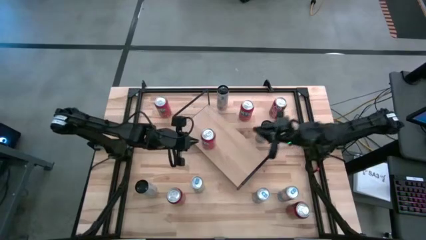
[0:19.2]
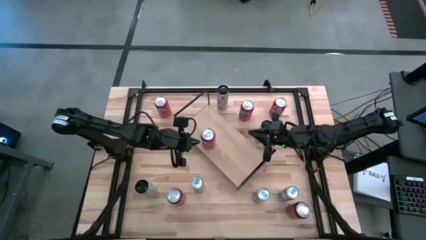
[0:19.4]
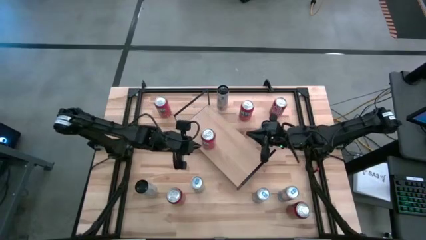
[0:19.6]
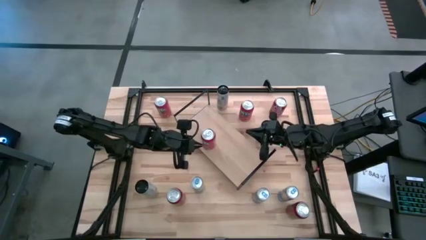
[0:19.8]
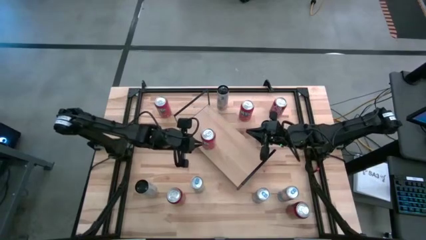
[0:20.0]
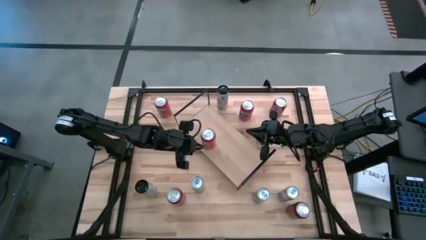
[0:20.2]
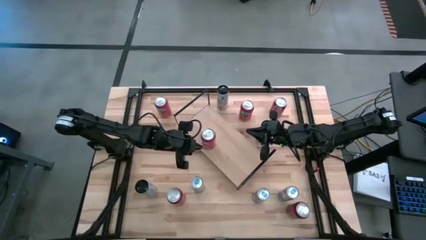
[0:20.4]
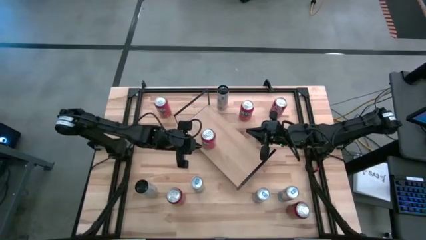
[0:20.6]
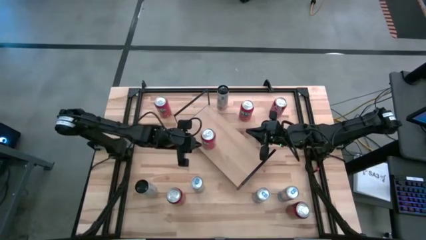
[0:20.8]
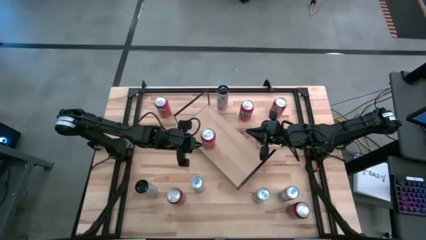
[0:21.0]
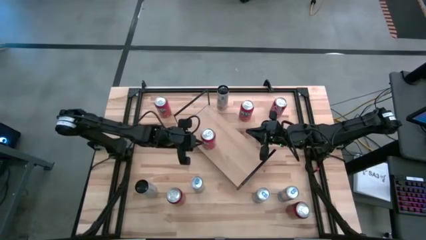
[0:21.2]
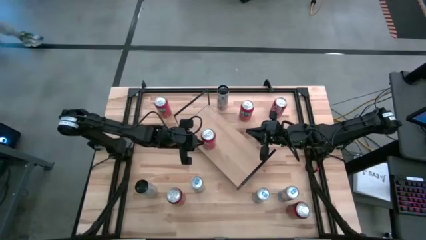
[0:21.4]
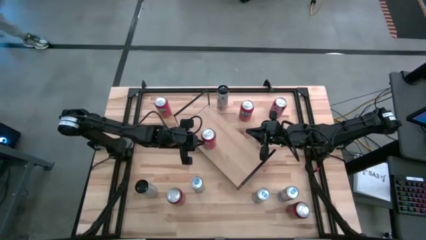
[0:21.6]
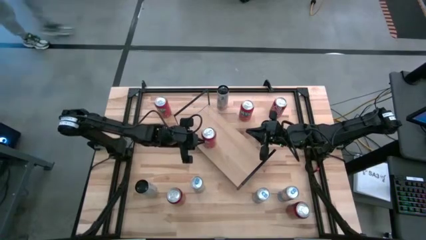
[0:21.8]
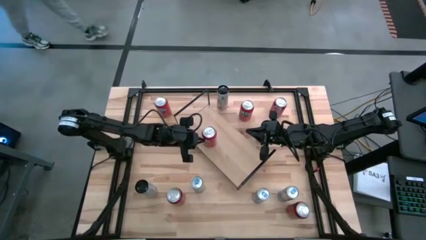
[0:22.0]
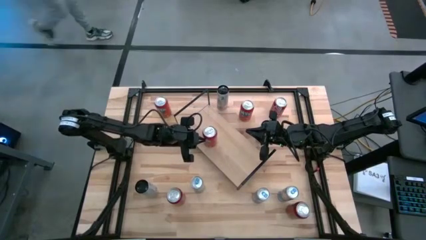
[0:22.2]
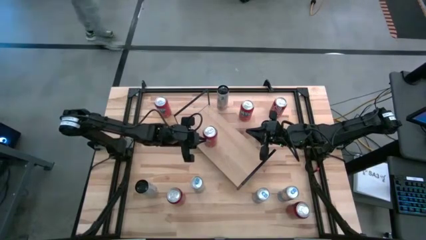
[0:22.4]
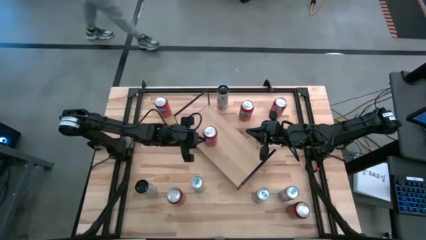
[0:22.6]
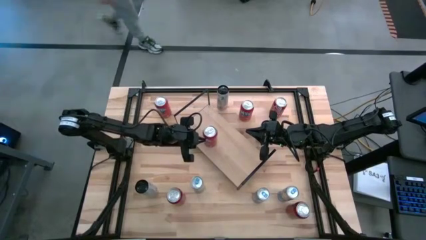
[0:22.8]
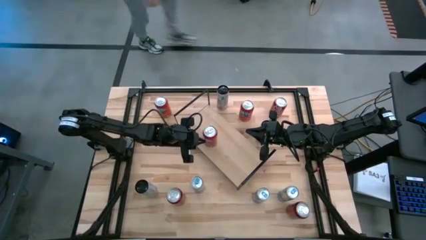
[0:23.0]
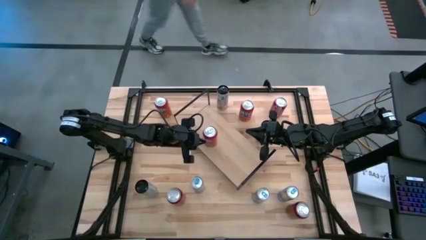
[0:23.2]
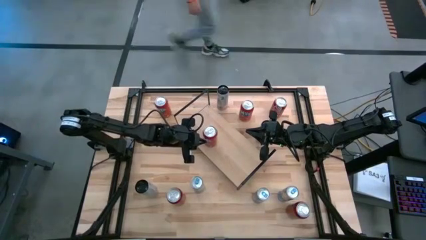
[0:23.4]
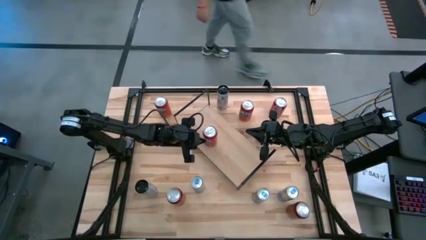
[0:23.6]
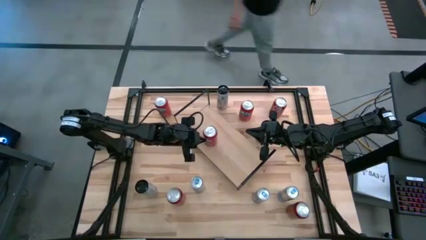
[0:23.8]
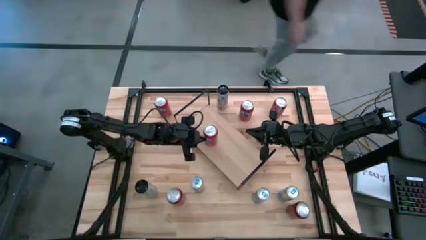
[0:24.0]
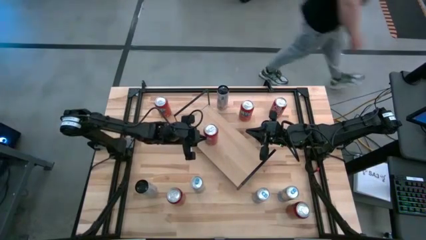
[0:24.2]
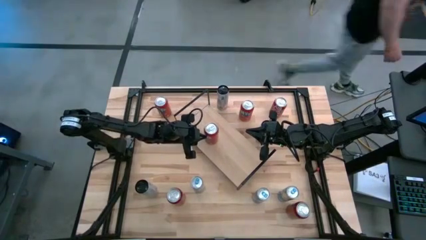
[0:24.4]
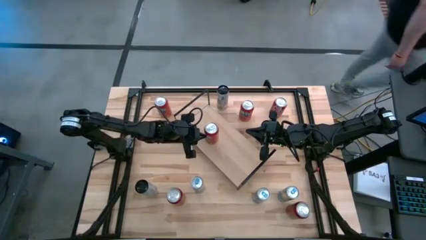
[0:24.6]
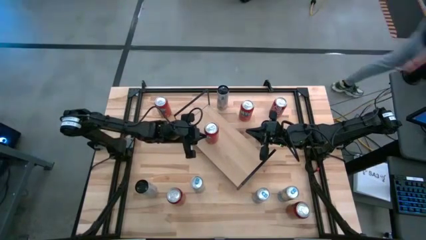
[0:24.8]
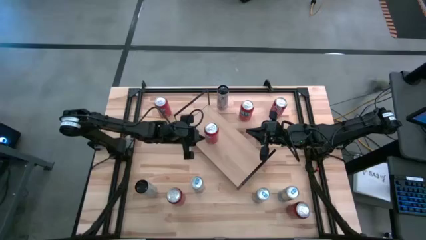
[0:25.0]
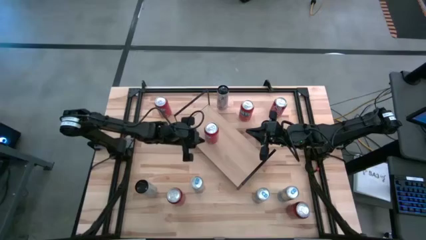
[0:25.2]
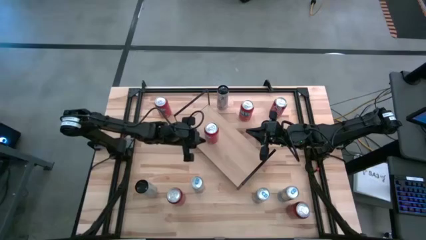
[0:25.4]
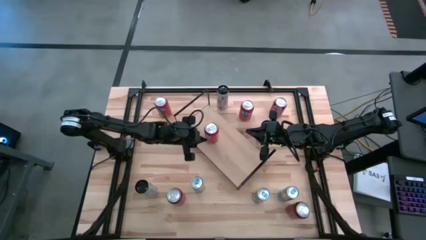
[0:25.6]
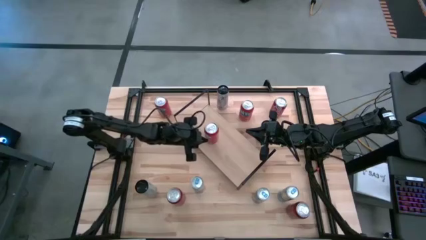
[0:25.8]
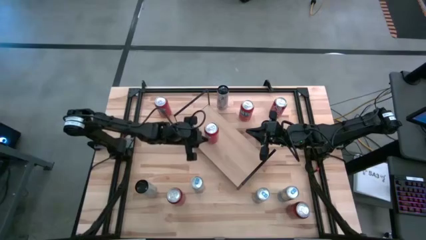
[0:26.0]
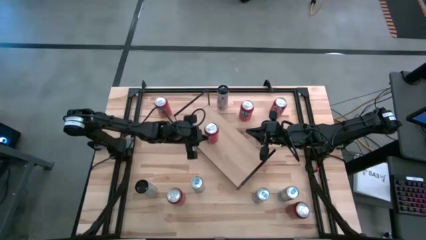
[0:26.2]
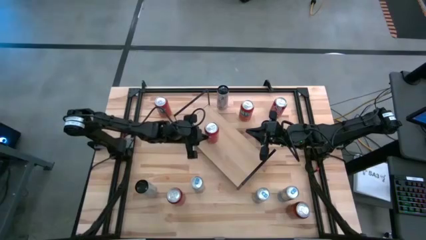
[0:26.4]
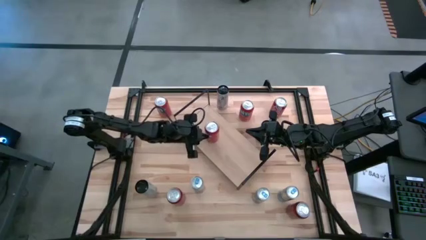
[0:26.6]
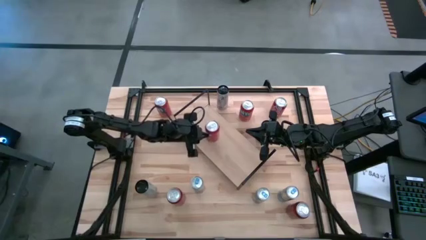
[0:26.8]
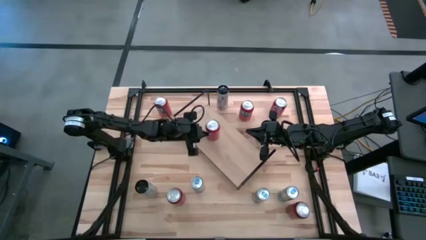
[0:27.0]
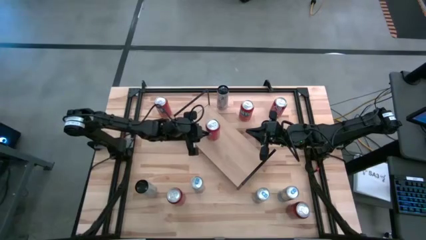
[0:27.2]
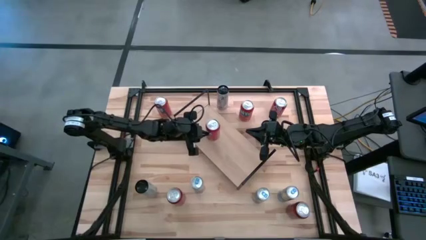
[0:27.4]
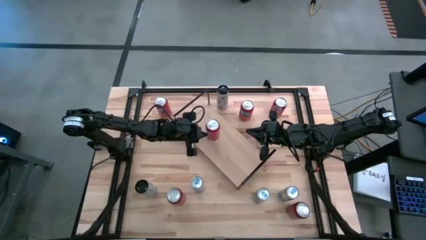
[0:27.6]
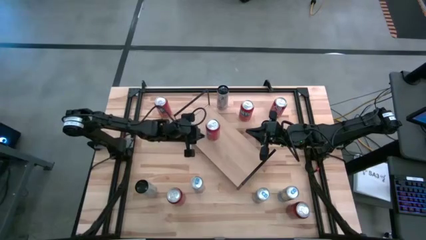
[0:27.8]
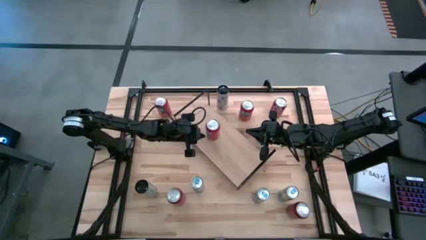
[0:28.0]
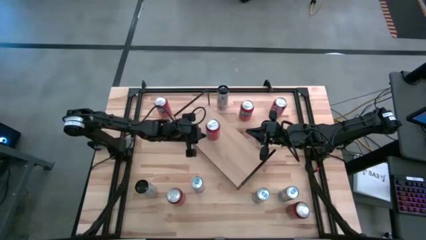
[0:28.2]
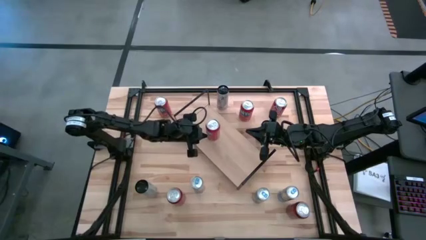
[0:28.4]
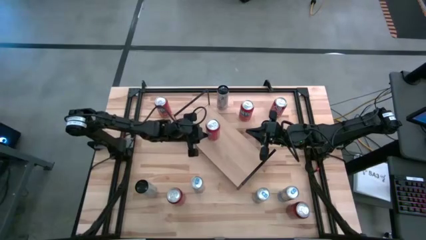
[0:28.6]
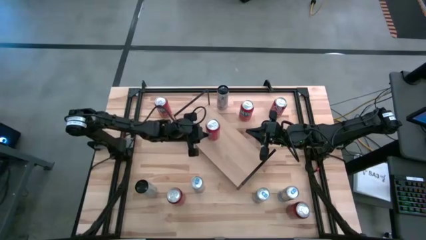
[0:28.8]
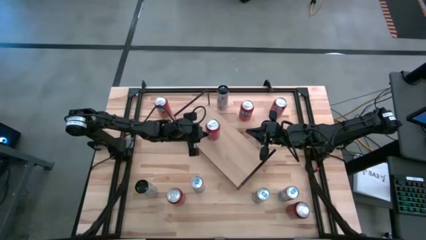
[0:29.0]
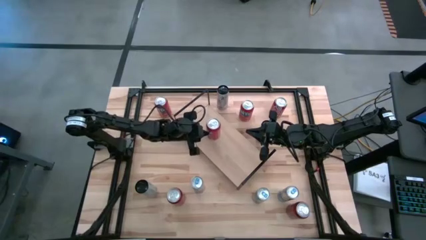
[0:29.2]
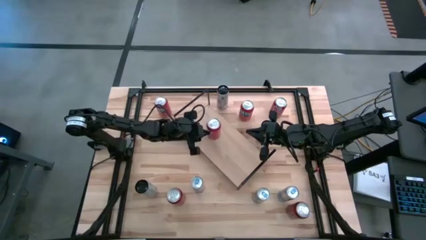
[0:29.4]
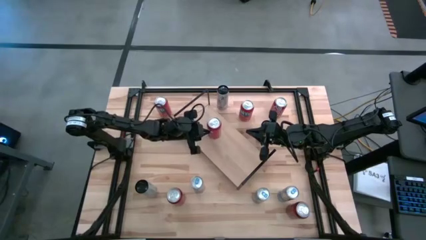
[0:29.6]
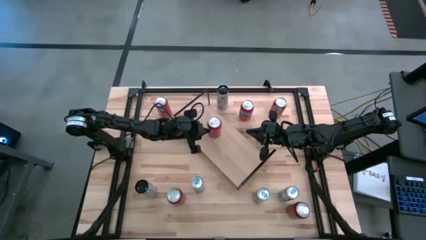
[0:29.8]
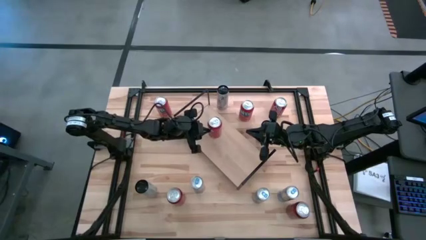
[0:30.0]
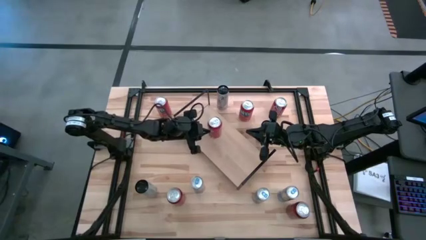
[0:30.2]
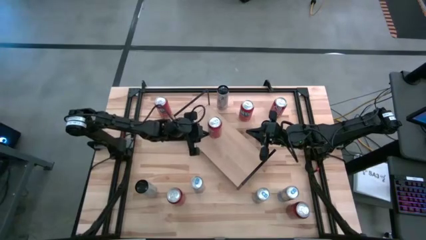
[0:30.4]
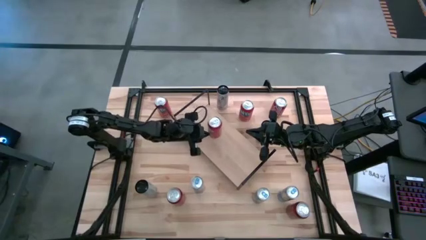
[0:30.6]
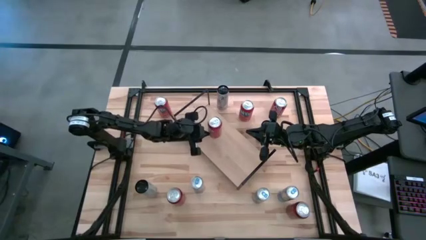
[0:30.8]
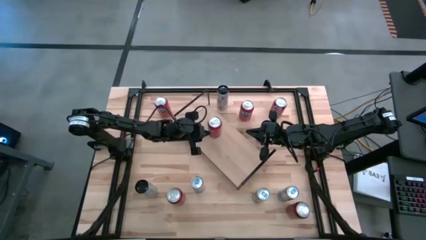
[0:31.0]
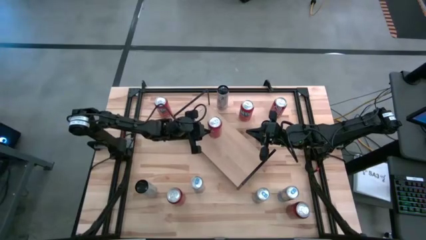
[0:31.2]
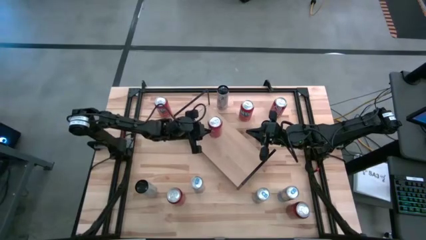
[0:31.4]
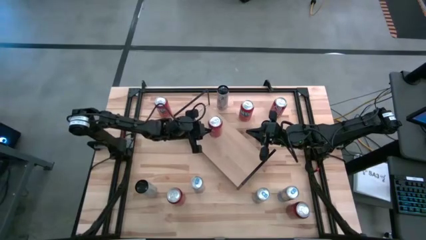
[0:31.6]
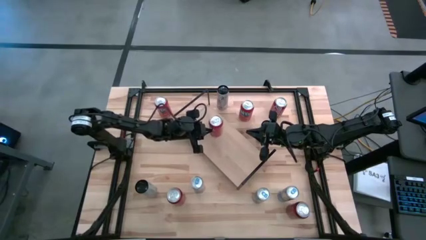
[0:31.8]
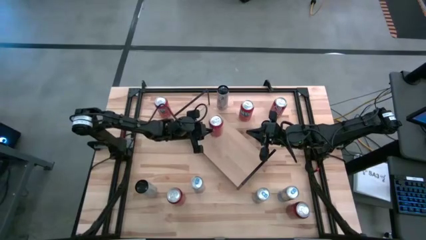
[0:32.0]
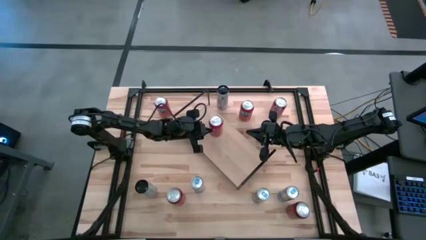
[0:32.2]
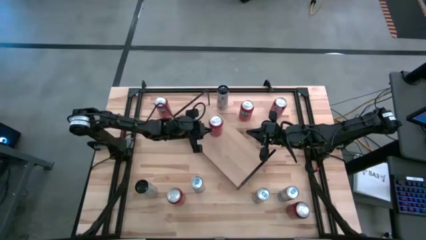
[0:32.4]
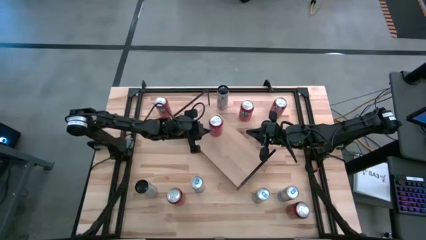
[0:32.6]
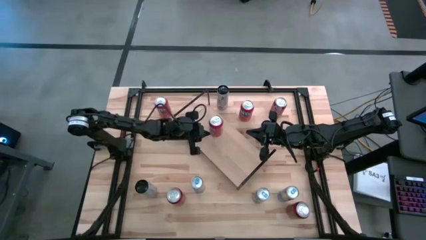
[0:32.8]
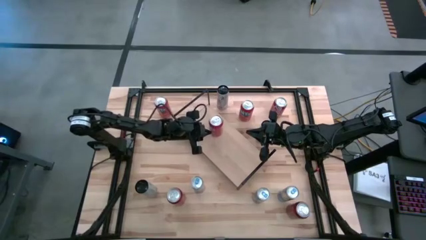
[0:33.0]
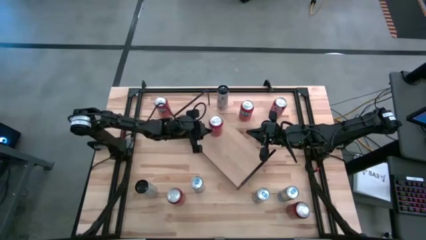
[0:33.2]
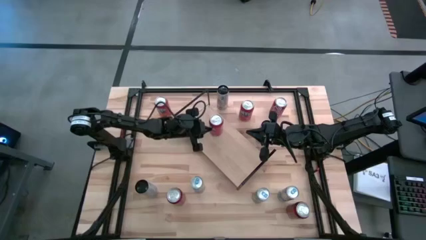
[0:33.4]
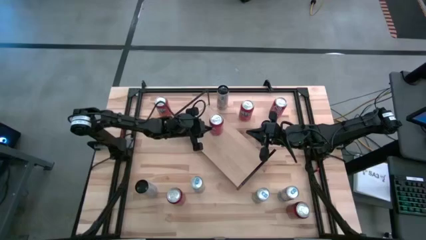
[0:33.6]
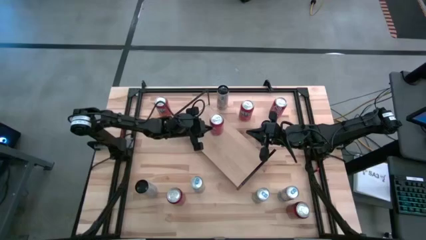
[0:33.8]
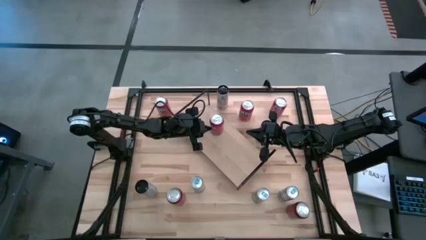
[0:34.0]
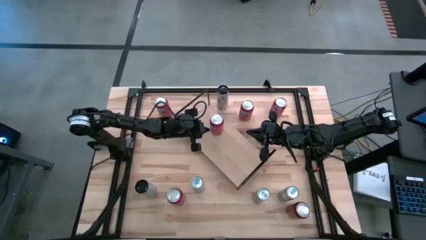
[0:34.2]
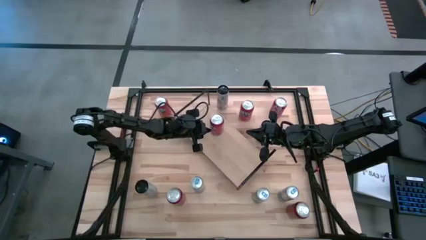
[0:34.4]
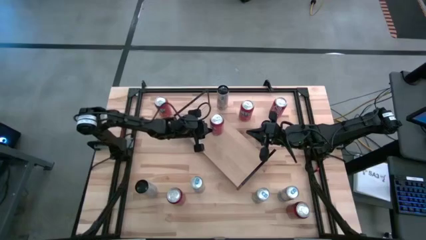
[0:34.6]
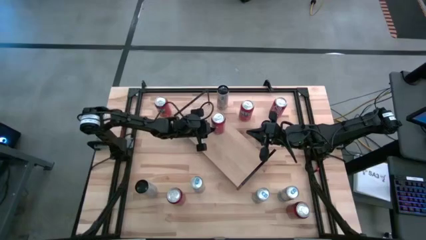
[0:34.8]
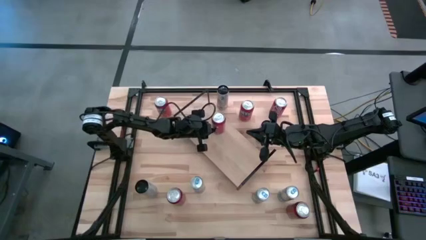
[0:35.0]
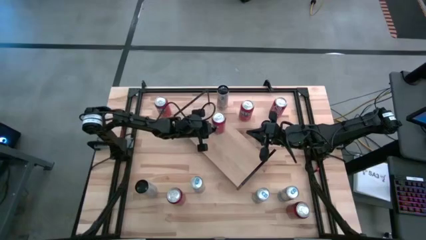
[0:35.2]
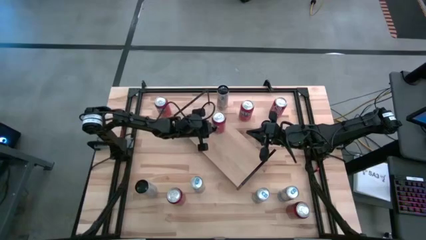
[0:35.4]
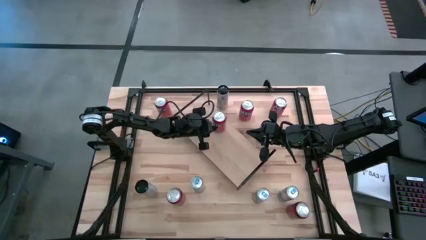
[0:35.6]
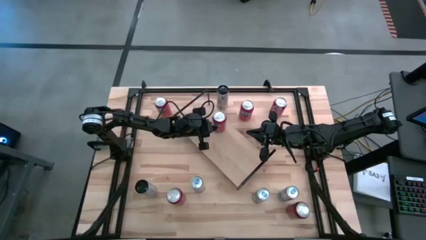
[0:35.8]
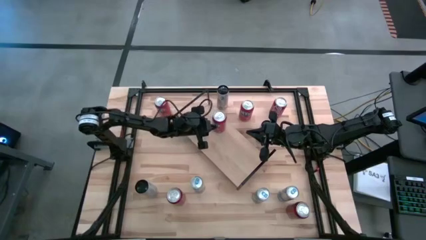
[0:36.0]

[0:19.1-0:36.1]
Task: Place canned beverage on shelf
Put the bottom orange soda can on the shelf
